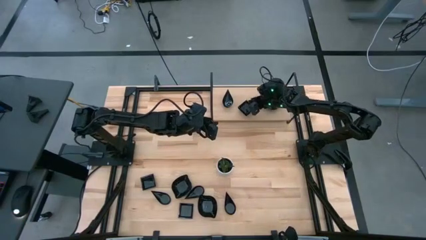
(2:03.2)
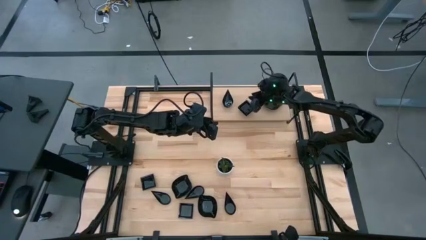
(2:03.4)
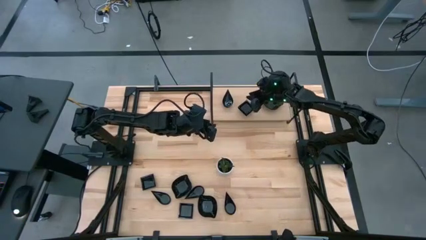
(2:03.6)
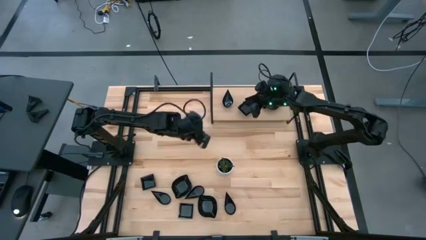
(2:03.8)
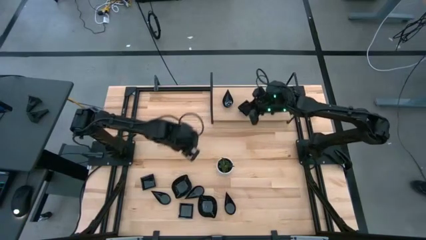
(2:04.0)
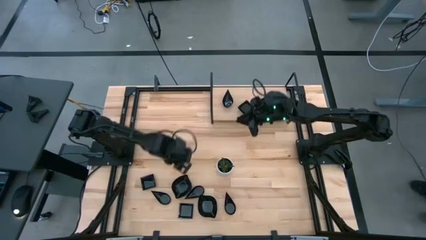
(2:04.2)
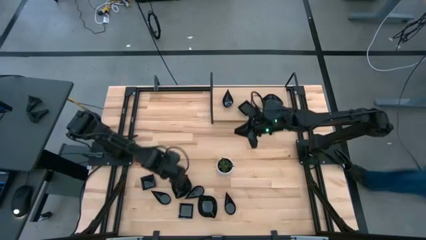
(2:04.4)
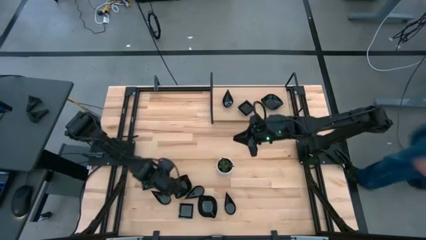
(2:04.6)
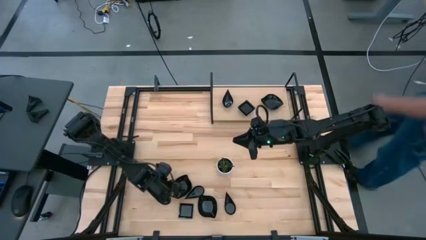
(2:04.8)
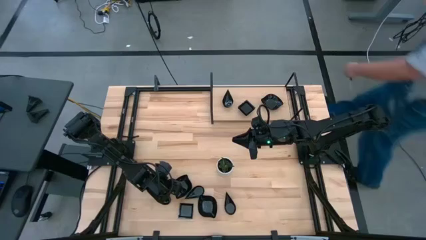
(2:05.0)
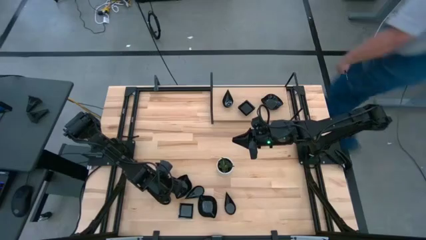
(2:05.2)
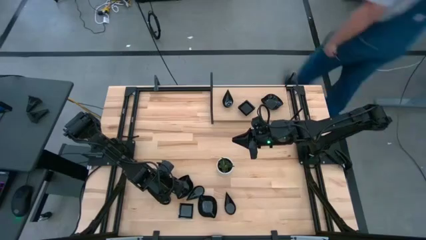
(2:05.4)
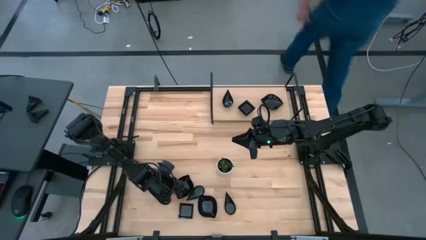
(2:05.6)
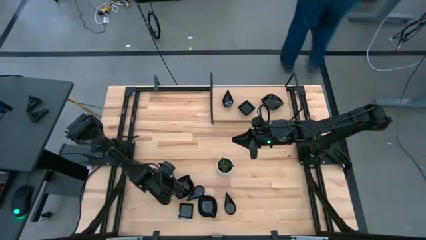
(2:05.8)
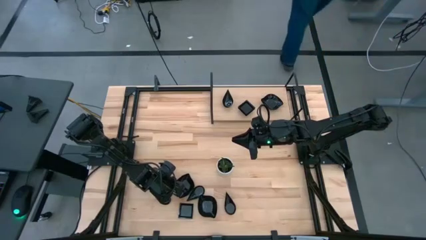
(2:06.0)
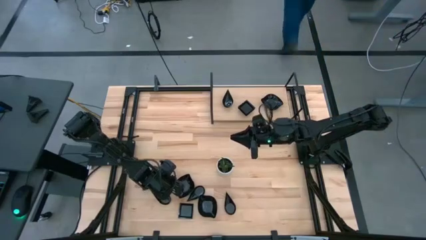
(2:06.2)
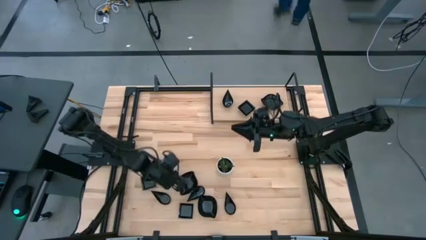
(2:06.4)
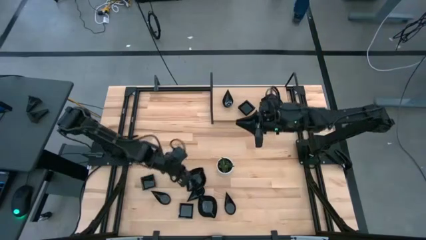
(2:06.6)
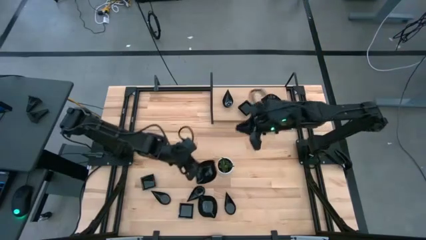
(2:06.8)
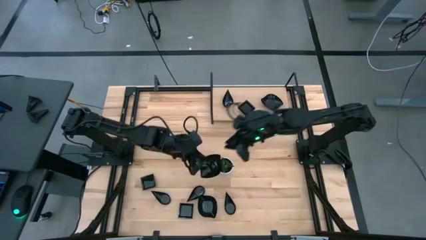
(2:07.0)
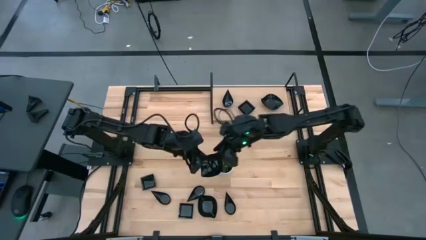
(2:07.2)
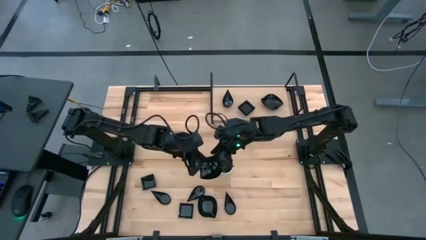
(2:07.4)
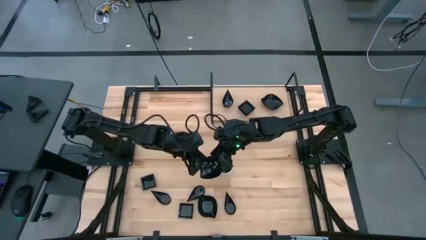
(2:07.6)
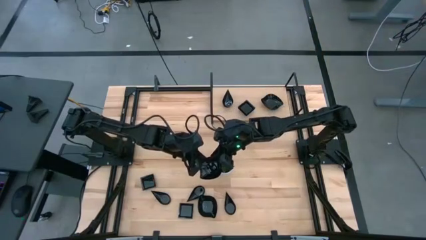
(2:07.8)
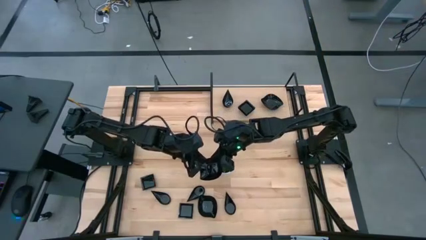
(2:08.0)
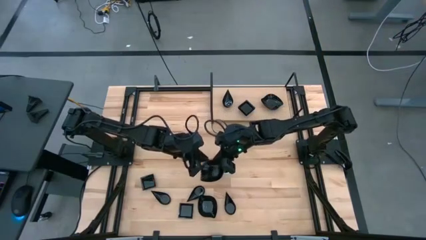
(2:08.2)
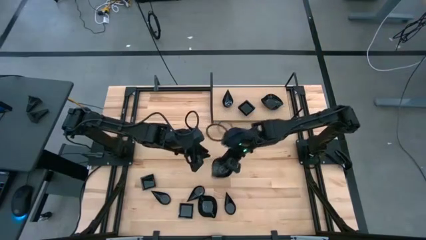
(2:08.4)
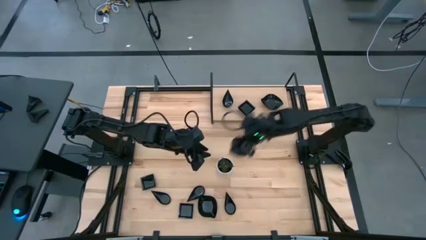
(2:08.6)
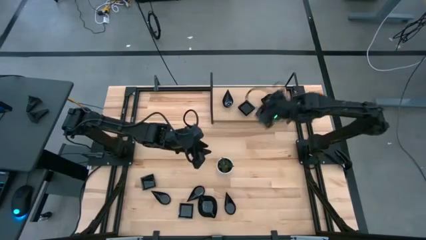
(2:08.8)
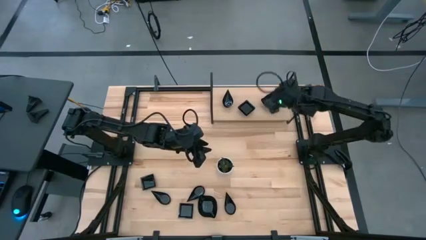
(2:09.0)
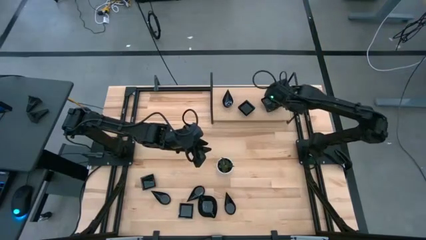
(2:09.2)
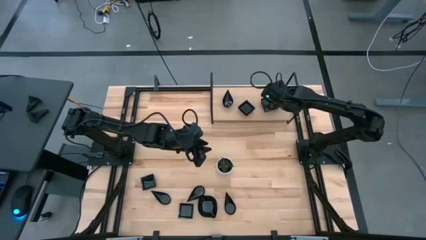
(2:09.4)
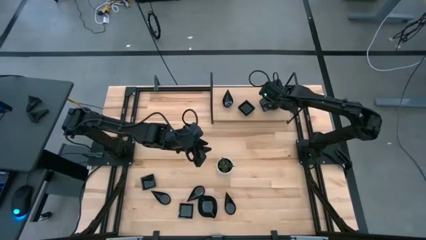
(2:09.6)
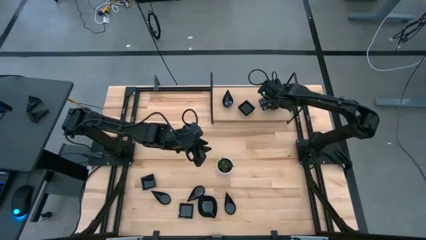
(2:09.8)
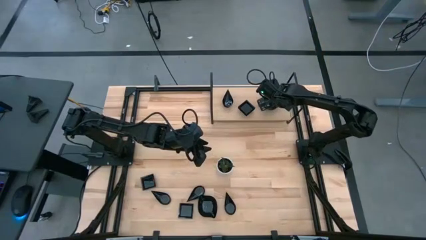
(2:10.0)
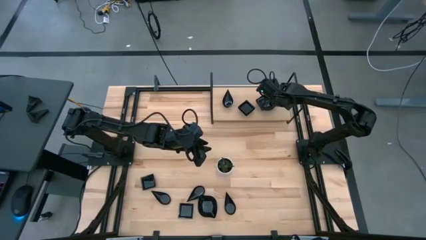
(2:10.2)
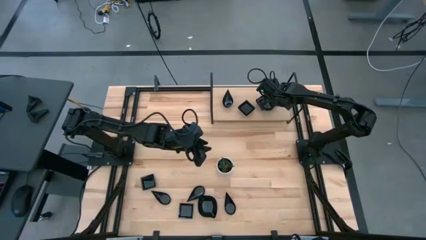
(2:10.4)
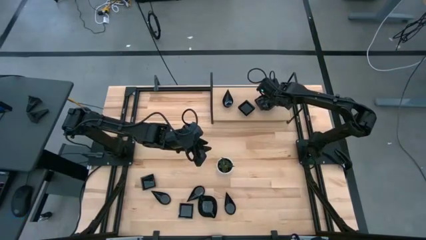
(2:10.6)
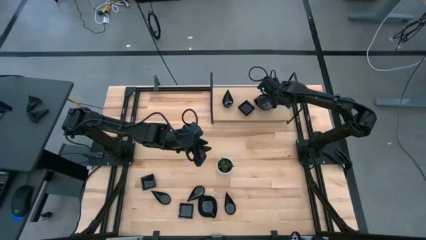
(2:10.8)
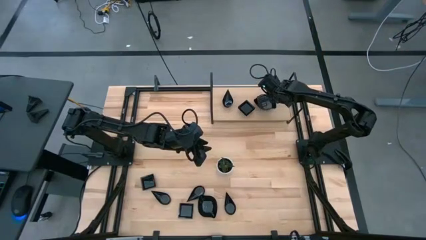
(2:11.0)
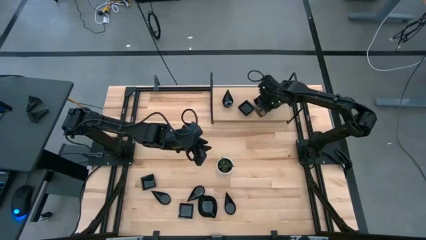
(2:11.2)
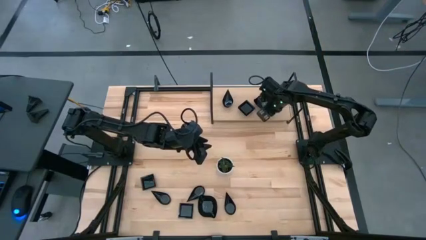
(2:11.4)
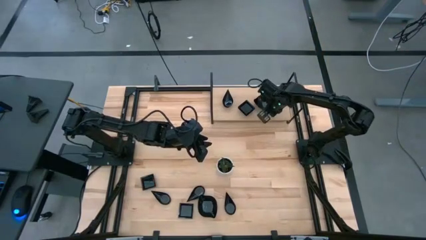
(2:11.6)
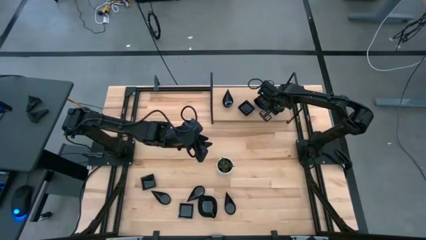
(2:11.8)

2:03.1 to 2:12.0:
Task: Pick & Place Mini shaped plates
Stack the leaf shaped plate on top of the leaf shaped plate on the shelf

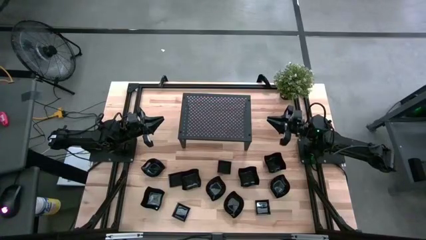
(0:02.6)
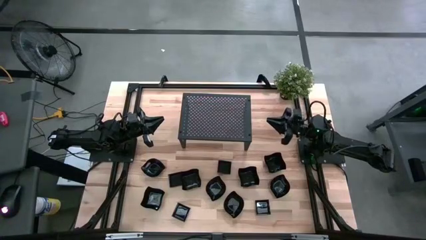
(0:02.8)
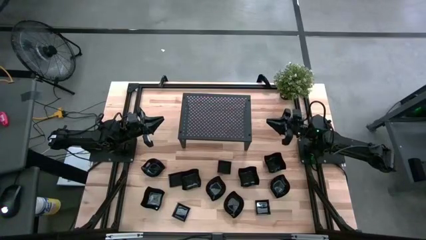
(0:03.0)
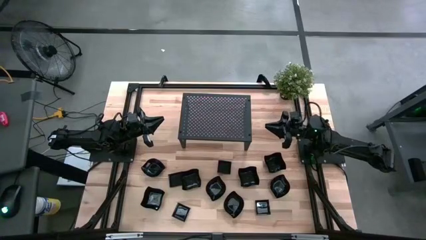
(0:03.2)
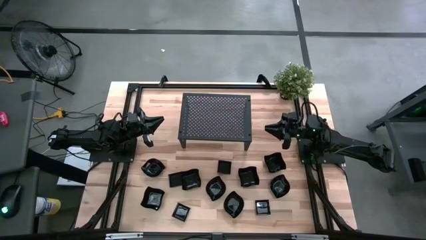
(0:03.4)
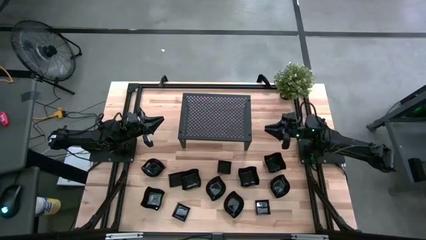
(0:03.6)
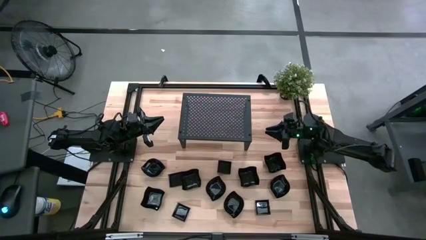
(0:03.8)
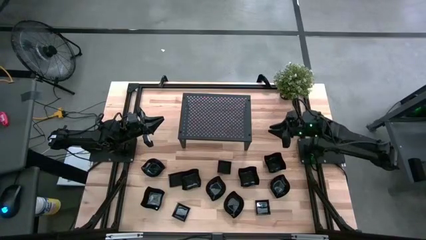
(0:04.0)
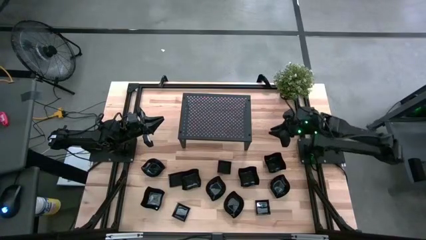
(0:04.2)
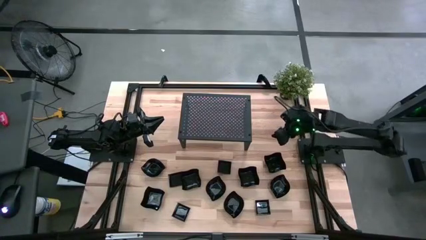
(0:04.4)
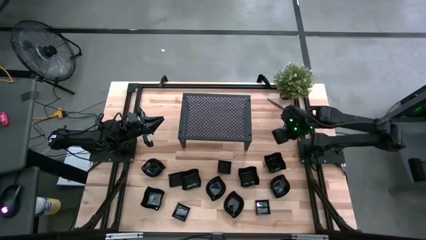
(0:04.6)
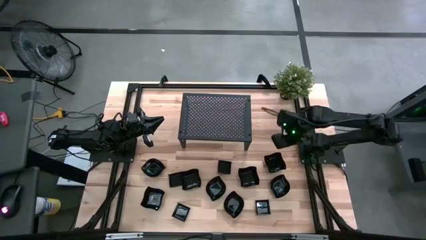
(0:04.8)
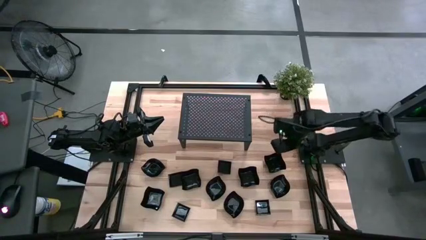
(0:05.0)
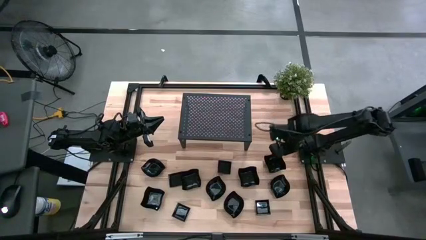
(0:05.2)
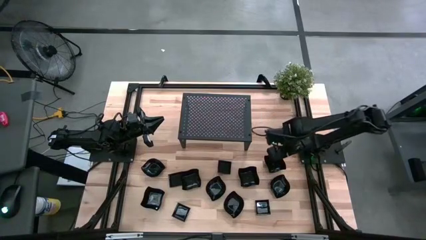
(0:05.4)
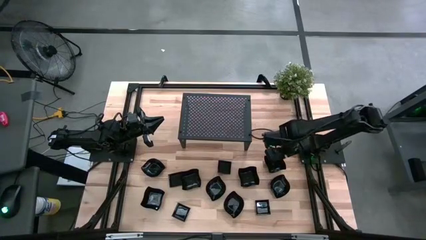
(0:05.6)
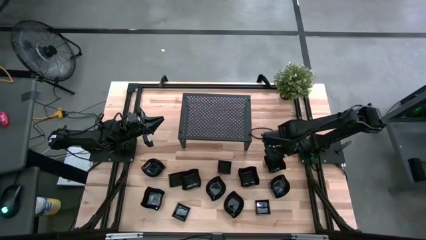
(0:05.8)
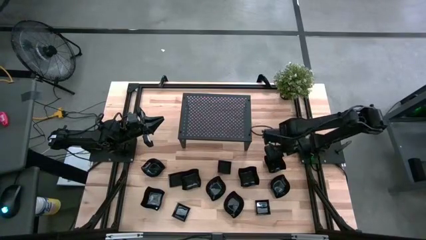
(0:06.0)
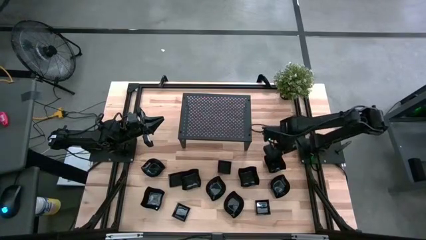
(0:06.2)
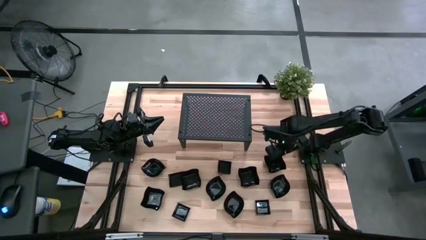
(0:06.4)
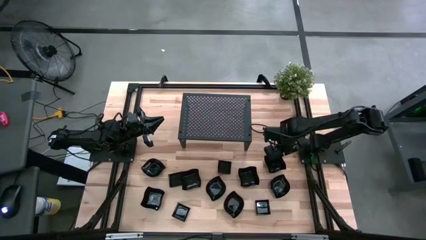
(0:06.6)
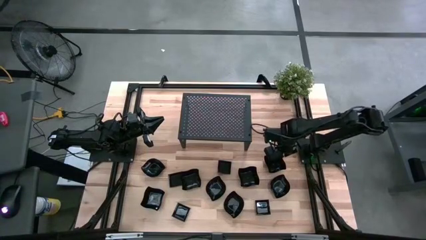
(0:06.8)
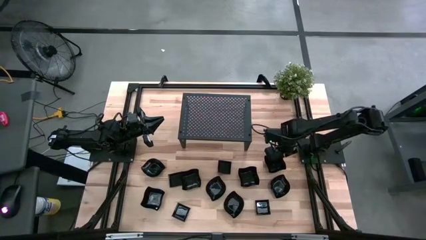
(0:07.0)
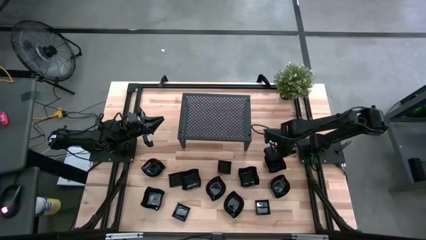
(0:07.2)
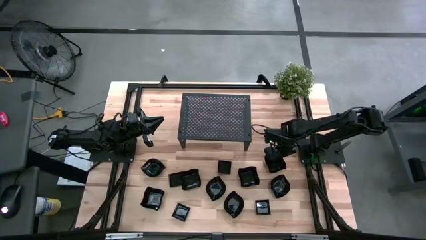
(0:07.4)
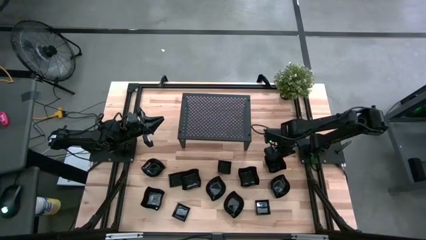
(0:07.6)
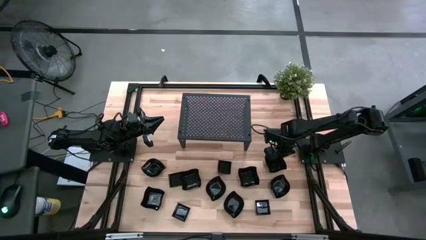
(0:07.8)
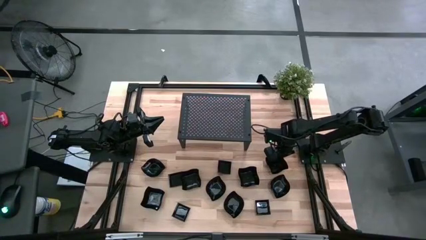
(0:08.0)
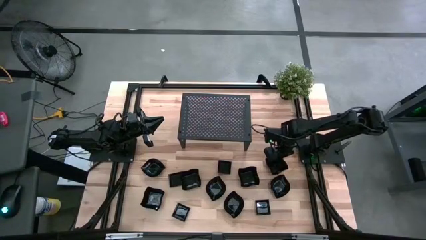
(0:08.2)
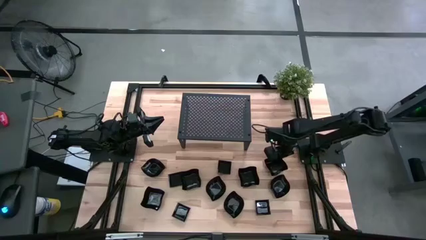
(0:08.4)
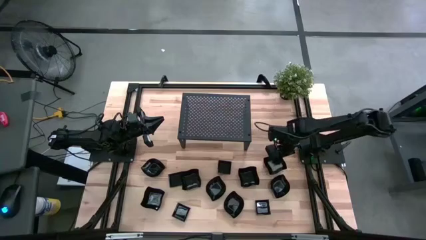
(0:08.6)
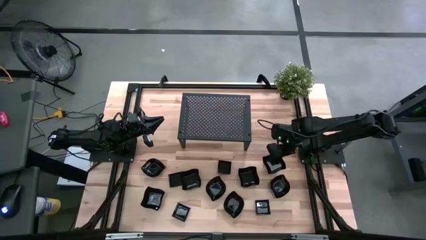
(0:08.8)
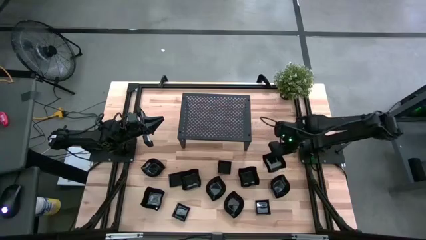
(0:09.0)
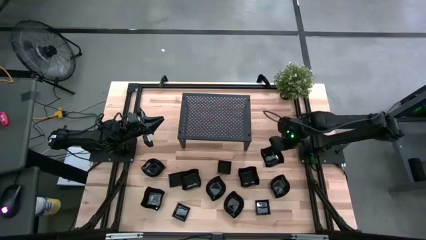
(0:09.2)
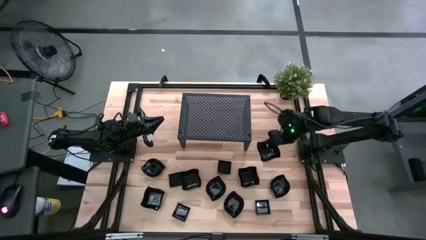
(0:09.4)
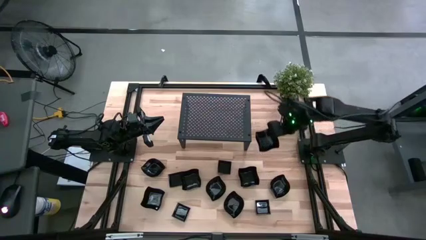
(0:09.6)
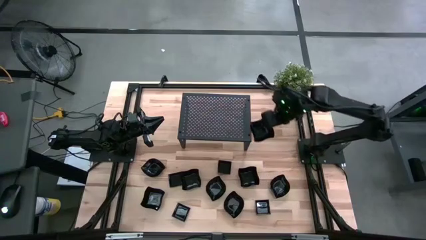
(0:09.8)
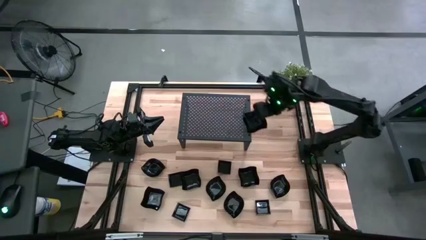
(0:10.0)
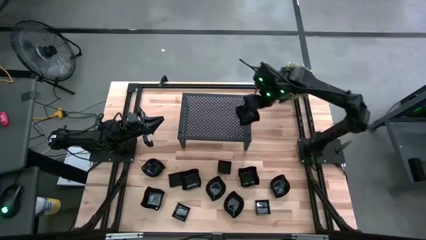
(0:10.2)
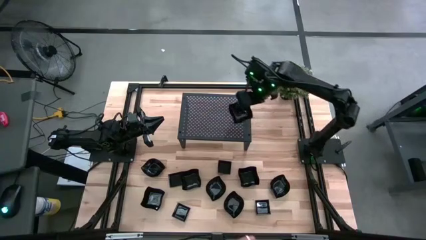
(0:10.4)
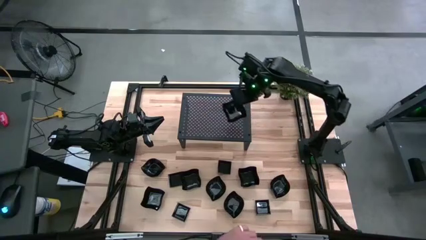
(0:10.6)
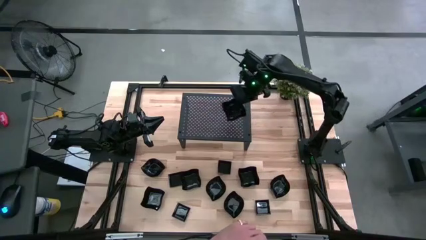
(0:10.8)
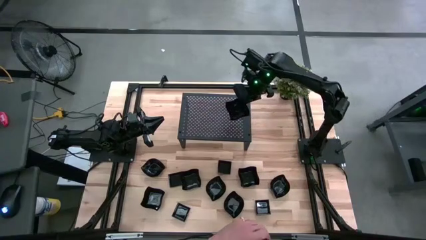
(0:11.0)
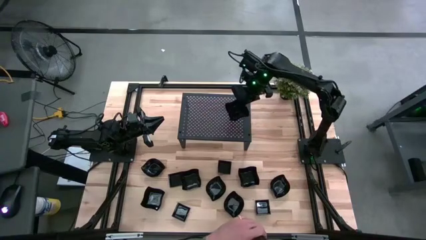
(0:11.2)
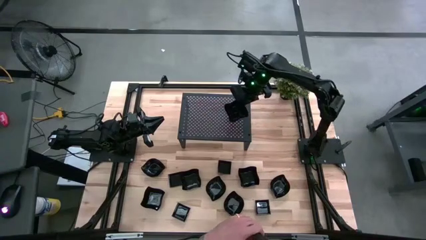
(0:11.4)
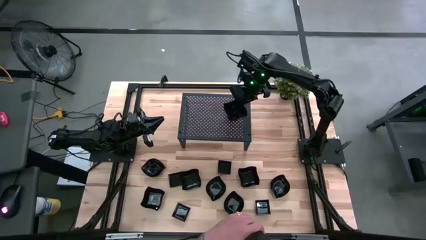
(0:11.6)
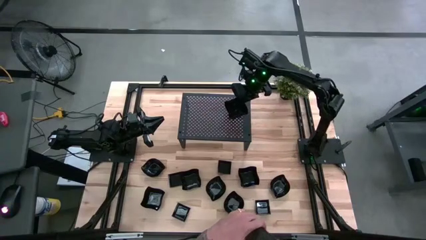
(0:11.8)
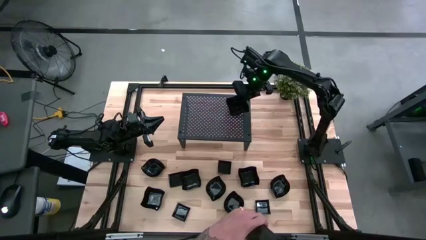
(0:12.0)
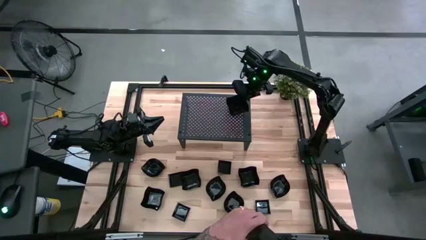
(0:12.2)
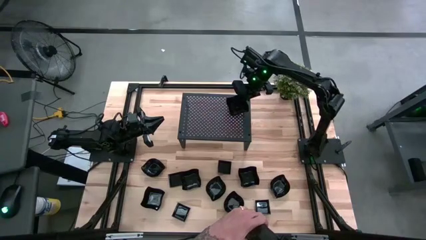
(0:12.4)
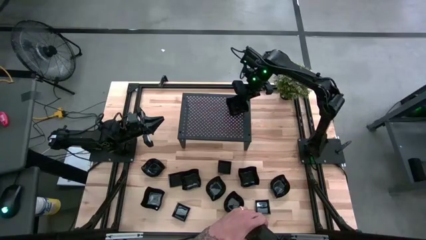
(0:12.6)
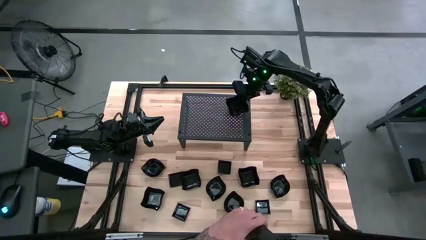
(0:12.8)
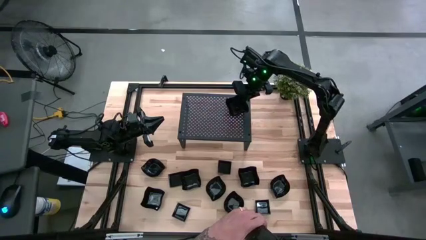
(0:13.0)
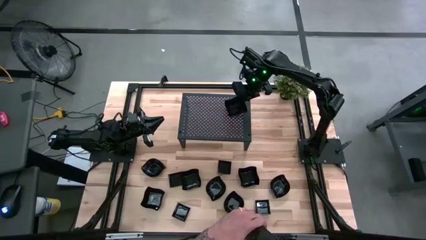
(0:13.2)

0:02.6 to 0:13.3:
Task: Pick & Place Mini shaped plates
Put the black distorted square plate on the shelf
